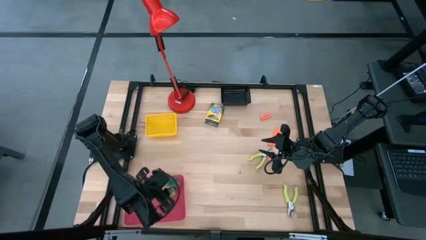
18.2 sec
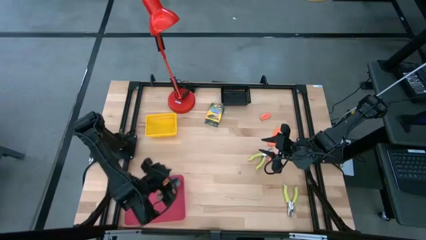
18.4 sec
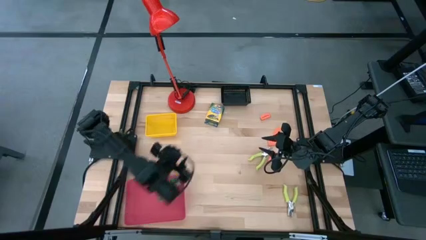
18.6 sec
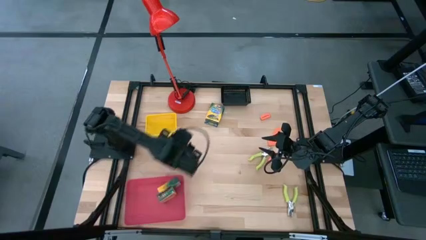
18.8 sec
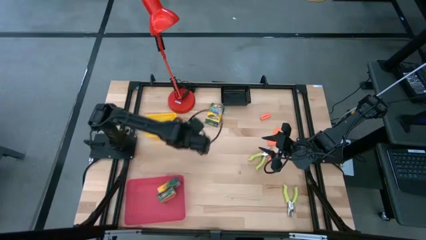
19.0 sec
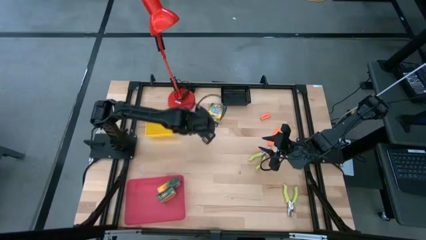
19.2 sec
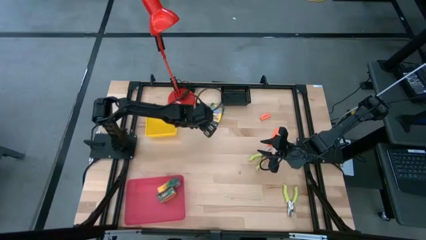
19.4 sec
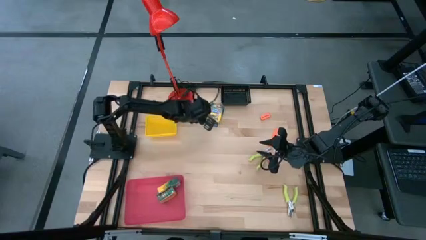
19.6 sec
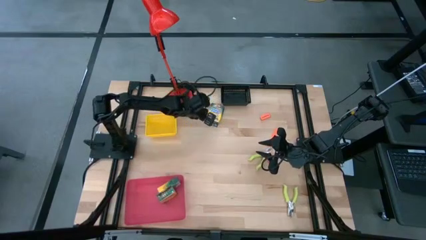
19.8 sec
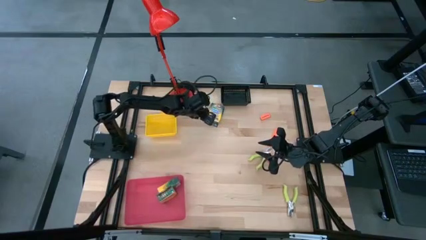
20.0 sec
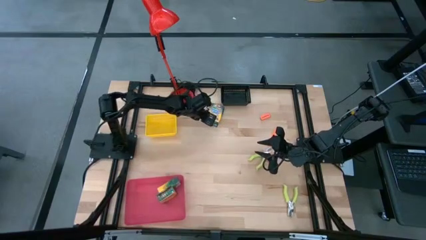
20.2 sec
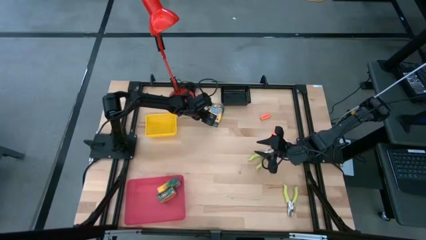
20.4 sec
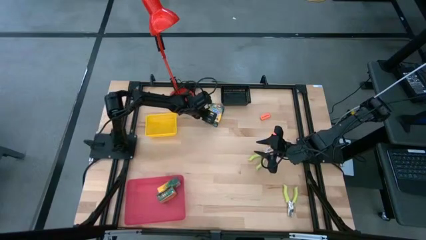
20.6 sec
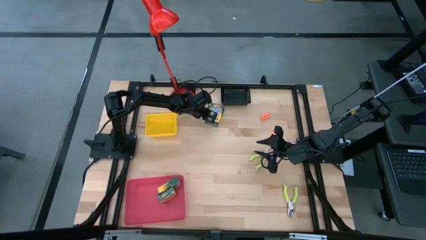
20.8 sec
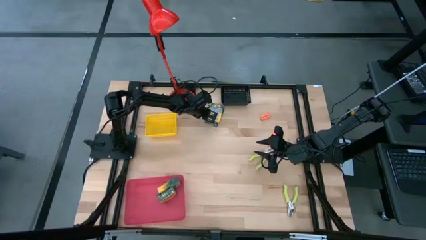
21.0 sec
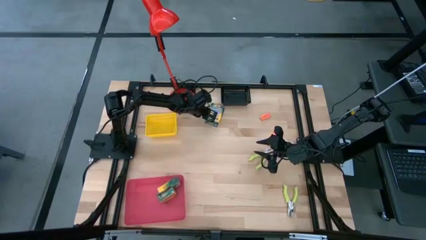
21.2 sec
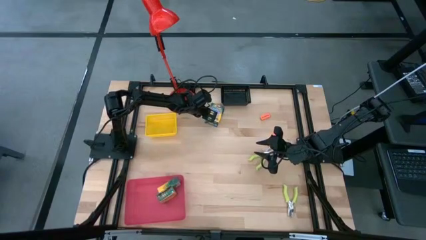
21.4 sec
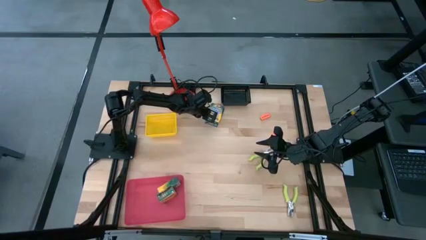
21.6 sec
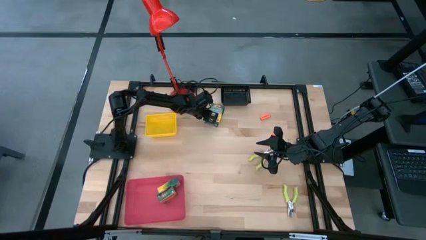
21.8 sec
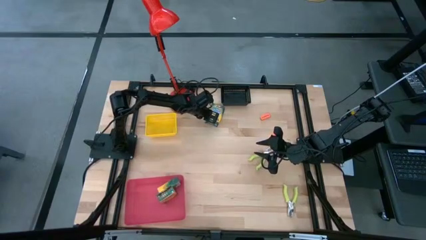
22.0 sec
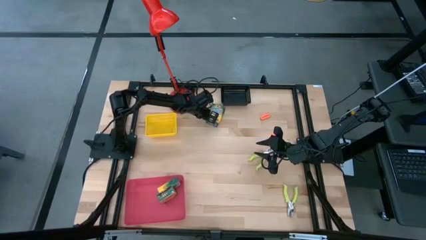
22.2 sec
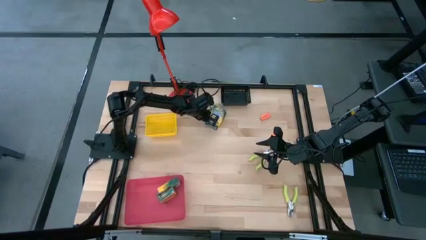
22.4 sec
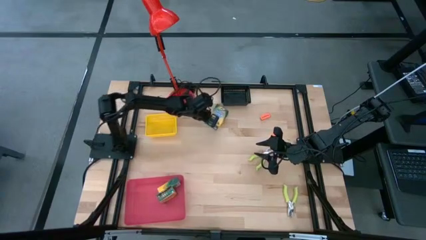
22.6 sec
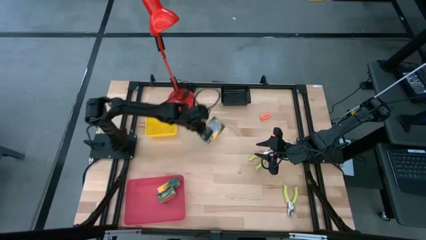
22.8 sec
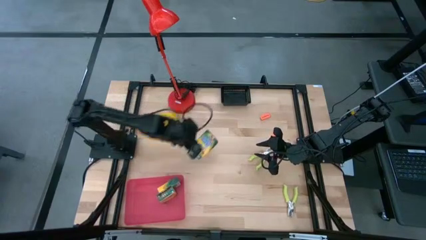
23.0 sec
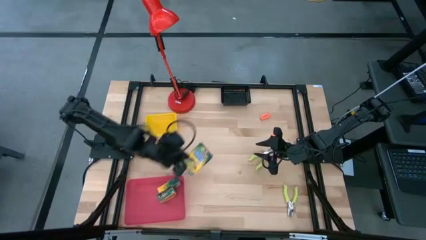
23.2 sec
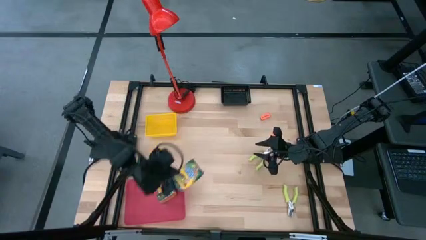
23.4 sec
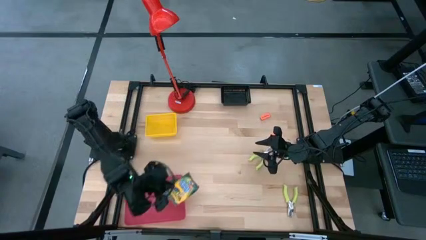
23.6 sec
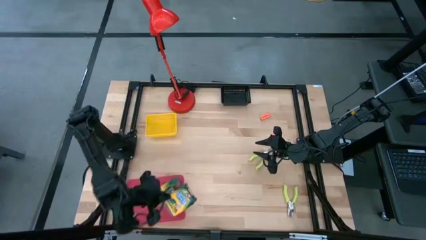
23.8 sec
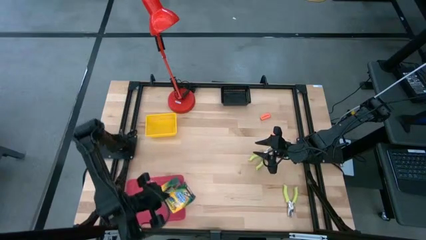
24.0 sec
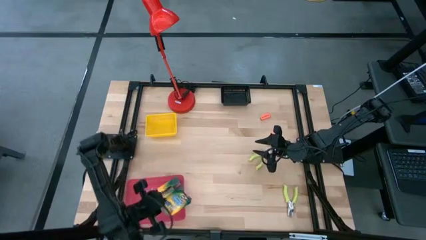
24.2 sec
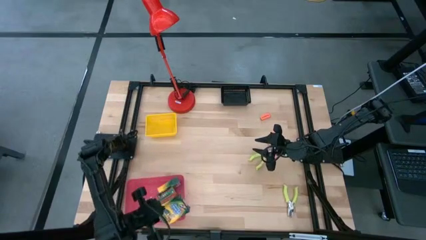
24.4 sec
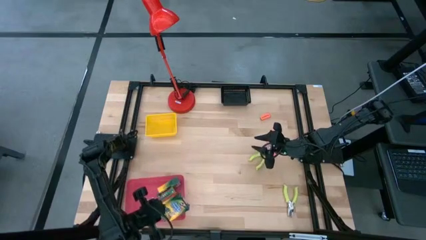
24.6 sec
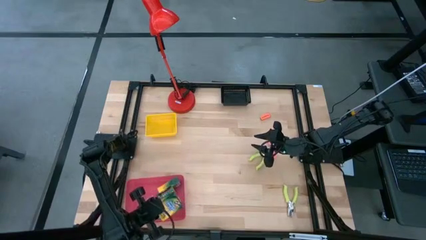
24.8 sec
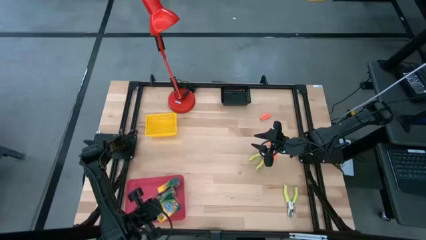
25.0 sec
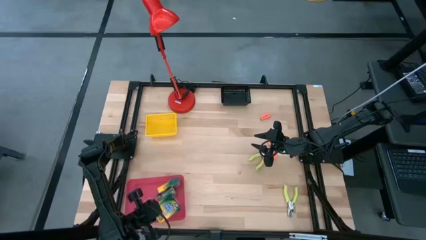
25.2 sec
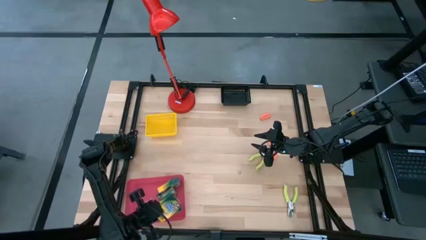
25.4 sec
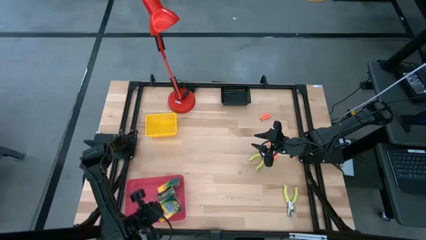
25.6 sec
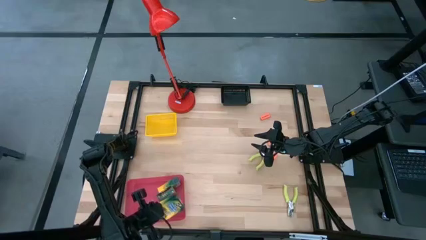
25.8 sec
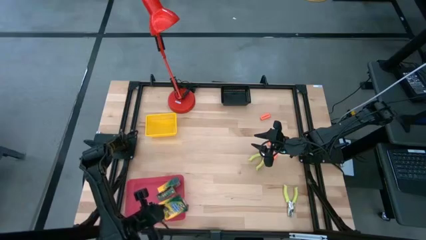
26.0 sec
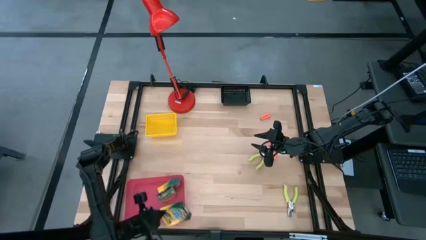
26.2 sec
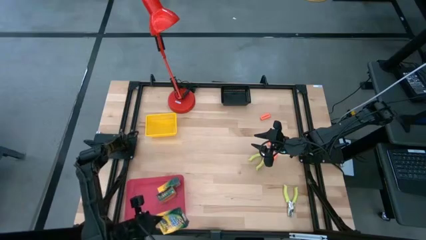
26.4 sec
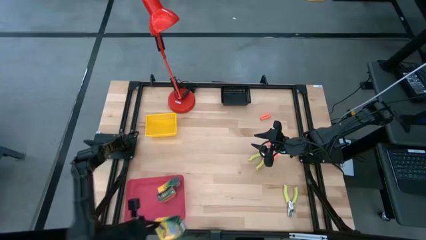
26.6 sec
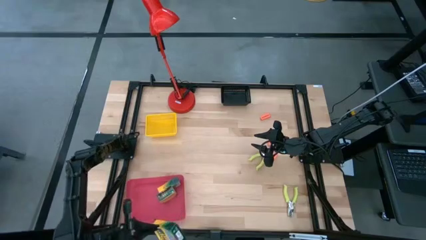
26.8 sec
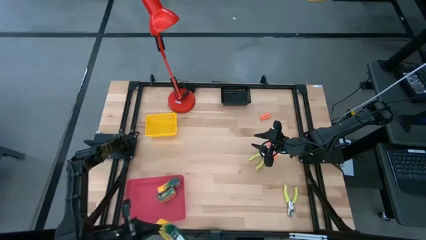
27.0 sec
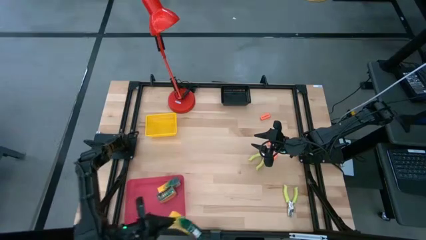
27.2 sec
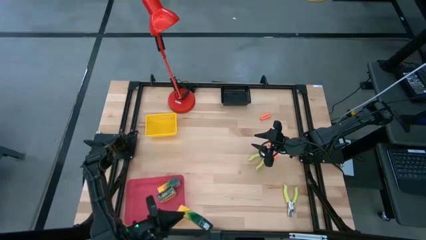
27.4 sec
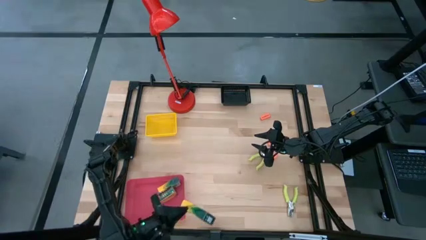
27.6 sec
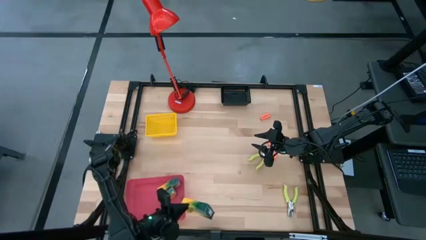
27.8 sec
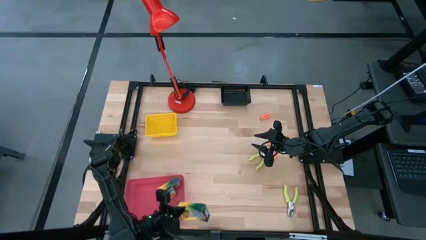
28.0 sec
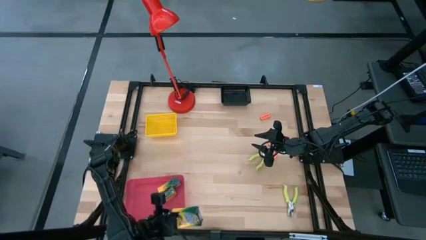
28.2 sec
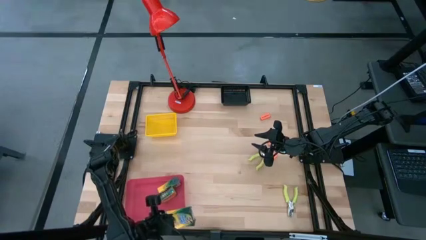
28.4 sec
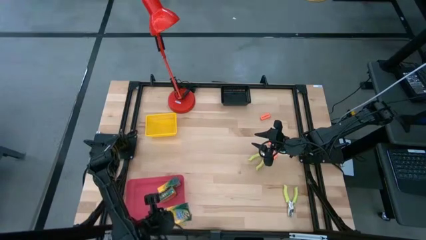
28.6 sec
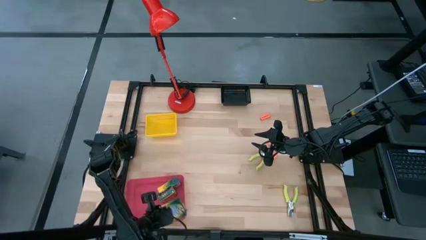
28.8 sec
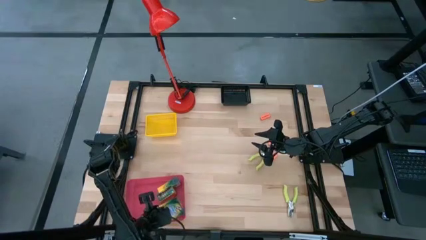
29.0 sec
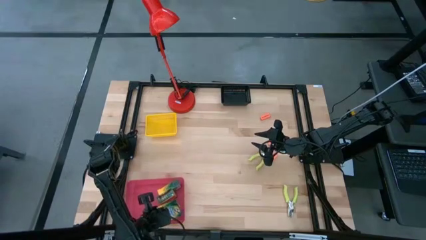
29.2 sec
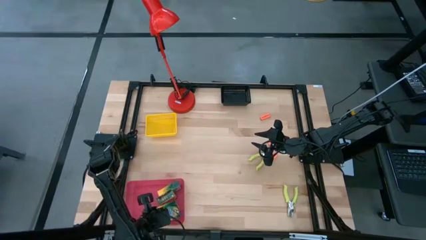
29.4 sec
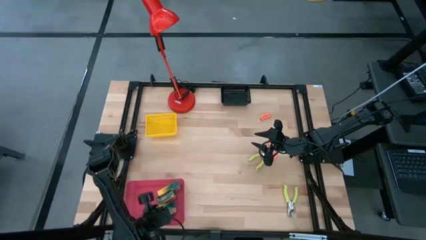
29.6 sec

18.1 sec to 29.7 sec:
Task: Pick & Place School Supplies
Put the crayon box into the pink bin

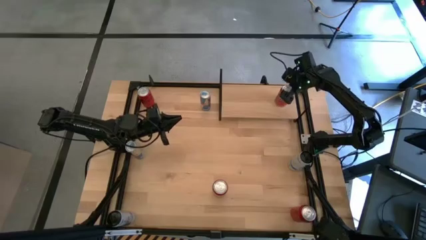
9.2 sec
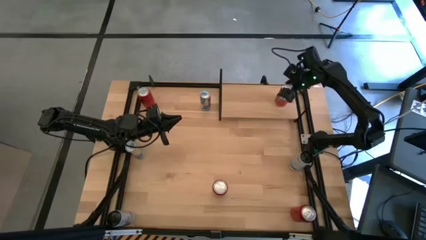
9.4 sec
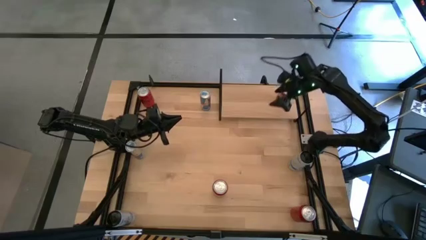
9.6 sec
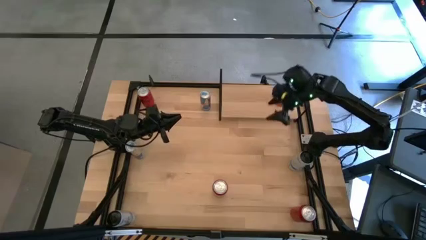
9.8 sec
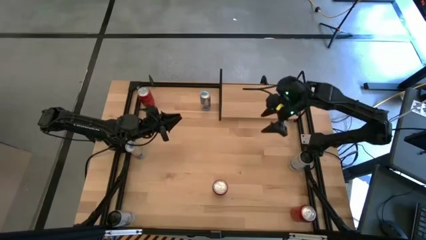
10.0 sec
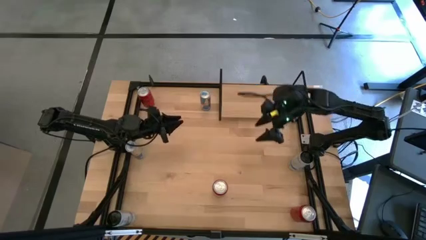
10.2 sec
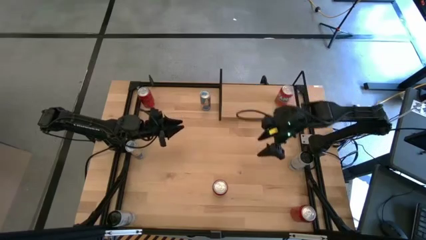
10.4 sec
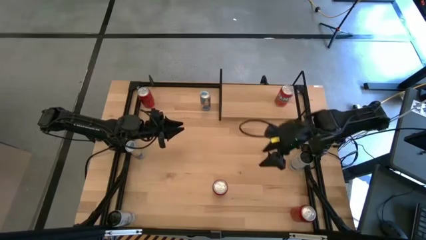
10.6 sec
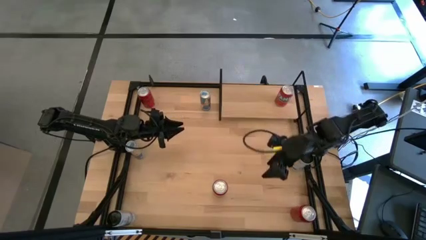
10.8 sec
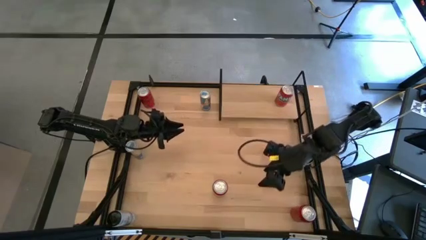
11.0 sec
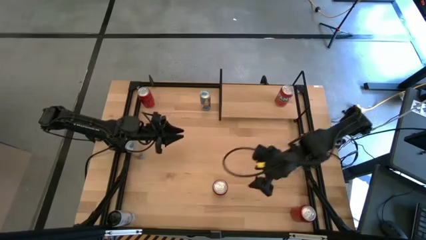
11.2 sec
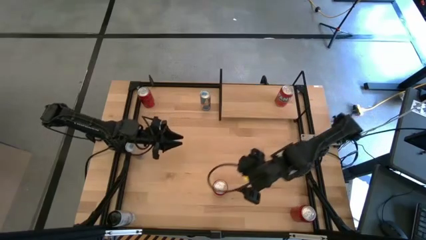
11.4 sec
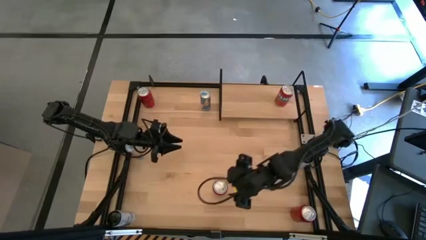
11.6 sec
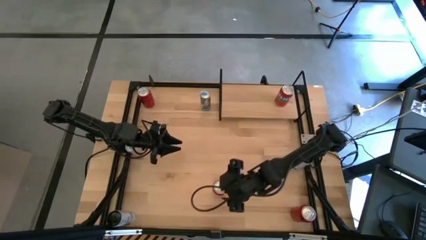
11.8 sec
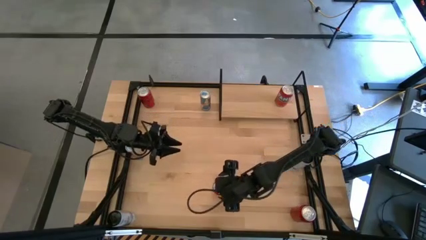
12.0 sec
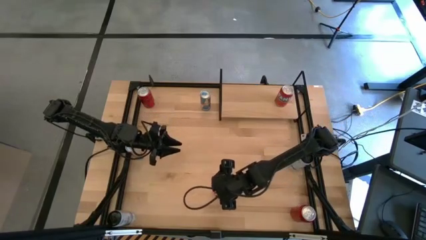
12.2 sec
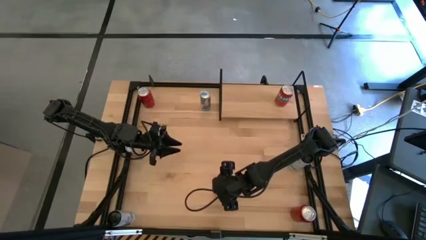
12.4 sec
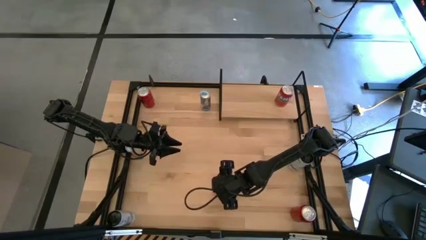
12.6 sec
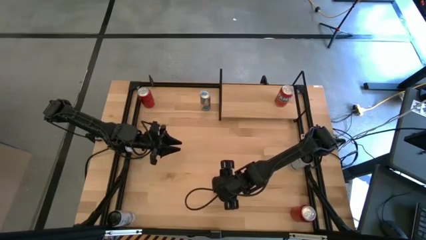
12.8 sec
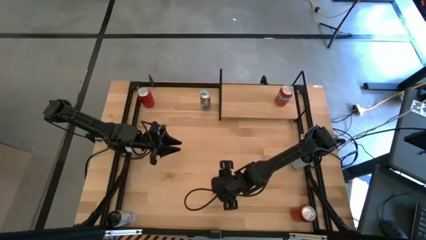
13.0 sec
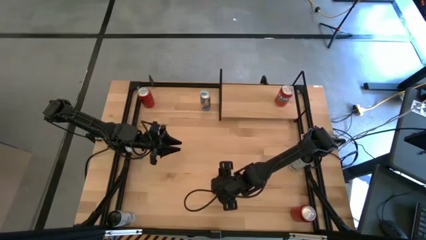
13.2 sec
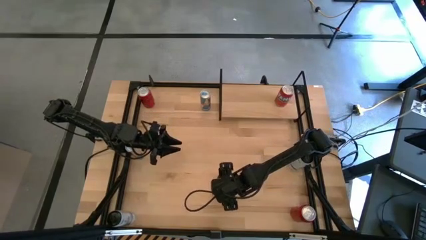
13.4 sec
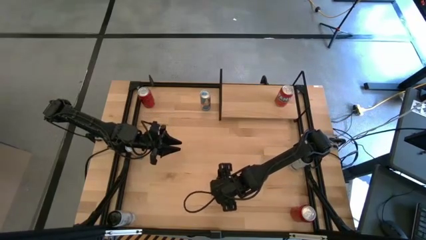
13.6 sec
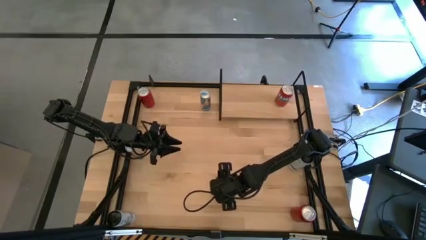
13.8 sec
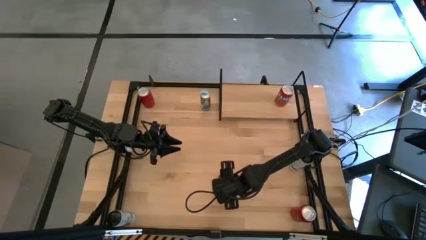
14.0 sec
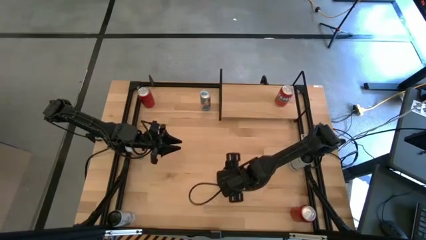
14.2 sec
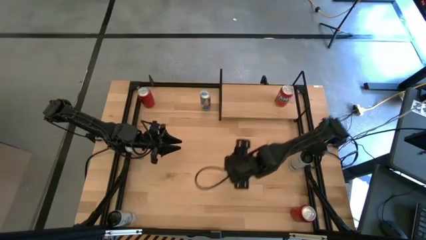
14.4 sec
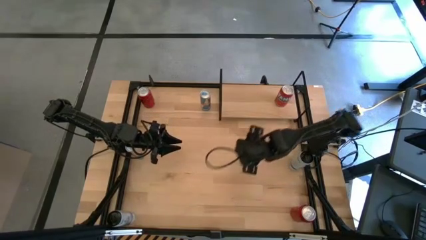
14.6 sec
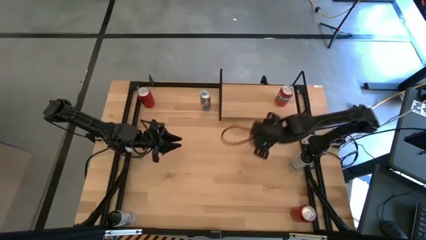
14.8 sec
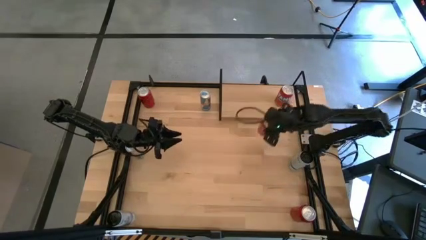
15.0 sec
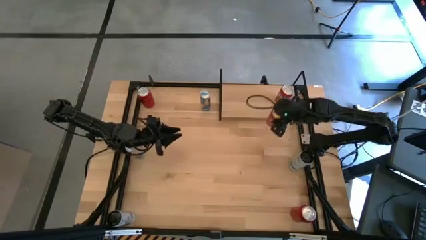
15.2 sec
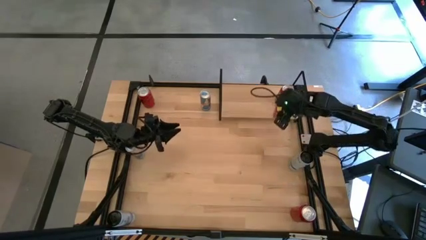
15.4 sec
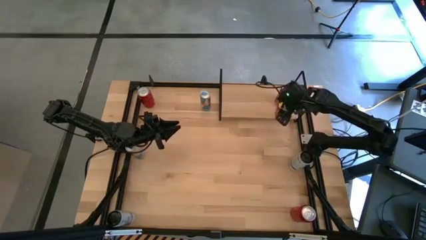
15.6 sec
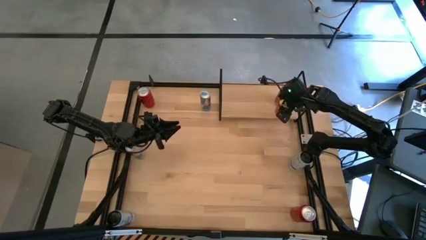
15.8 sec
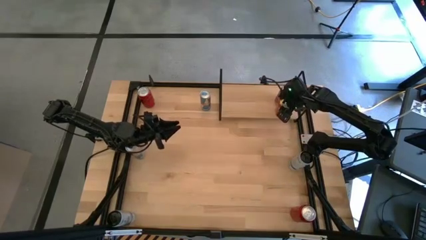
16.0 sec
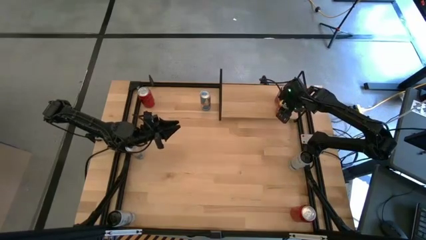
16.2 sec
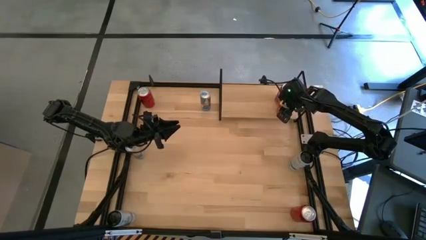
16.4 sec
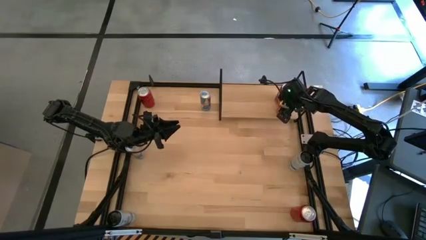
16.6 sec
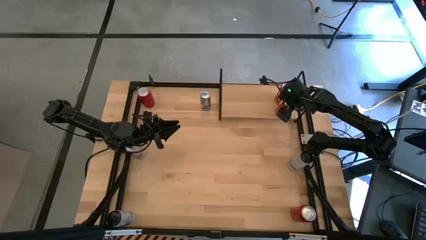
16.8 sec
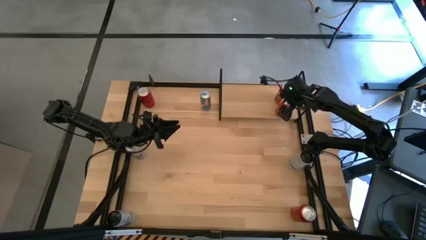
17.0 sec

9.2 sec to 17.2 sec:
Task: Place canned beverage on shelf
Put the orange soda can on the shelf aligned with the other orange soda can
